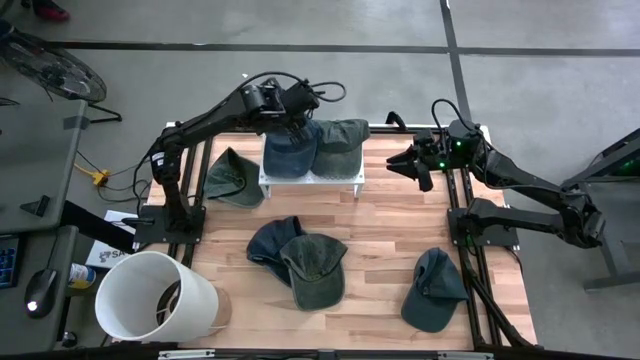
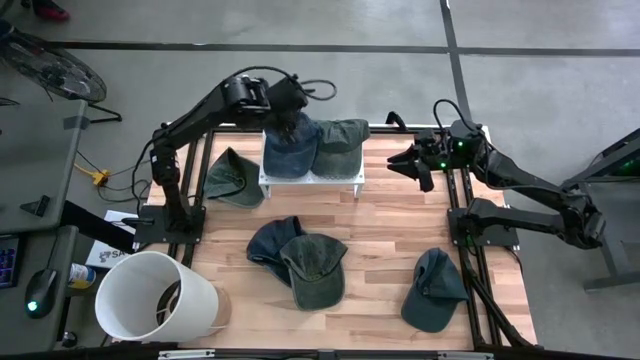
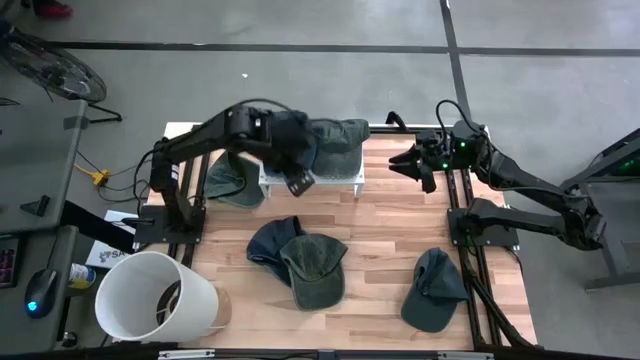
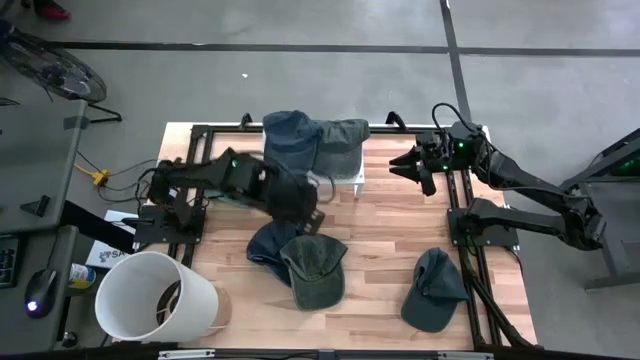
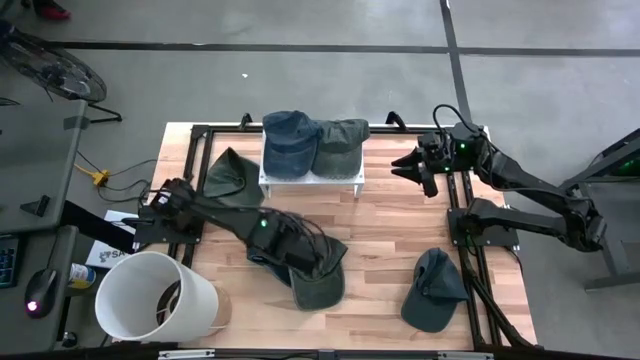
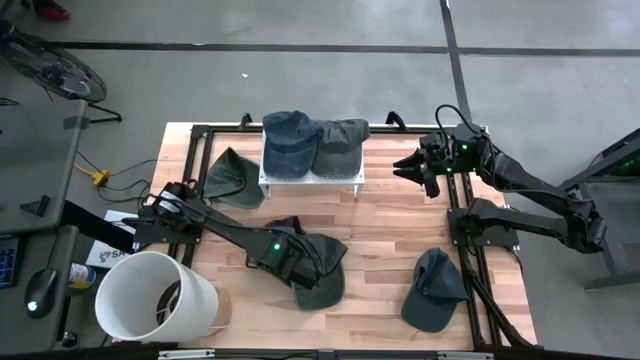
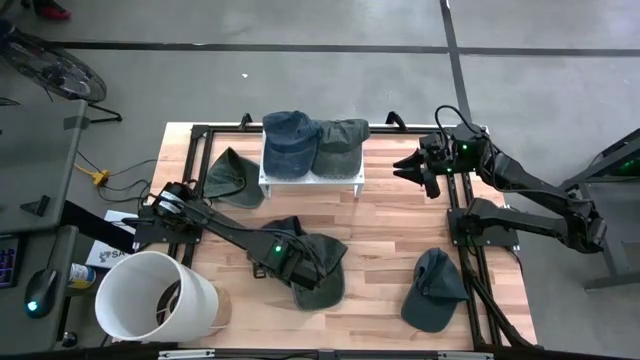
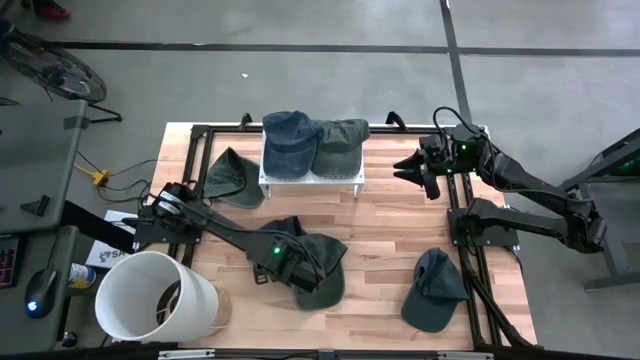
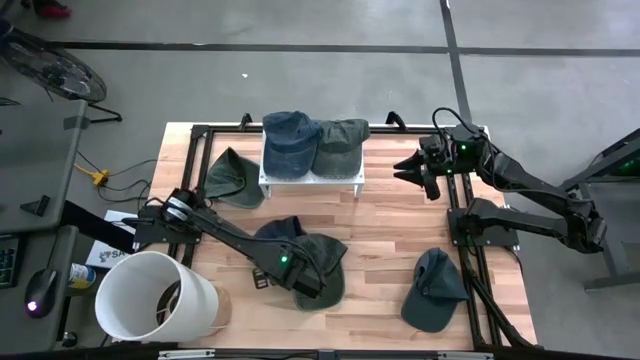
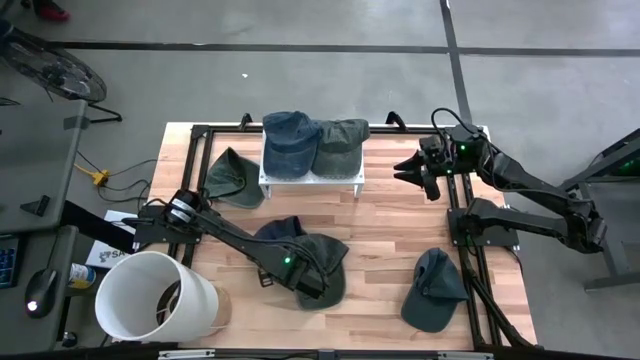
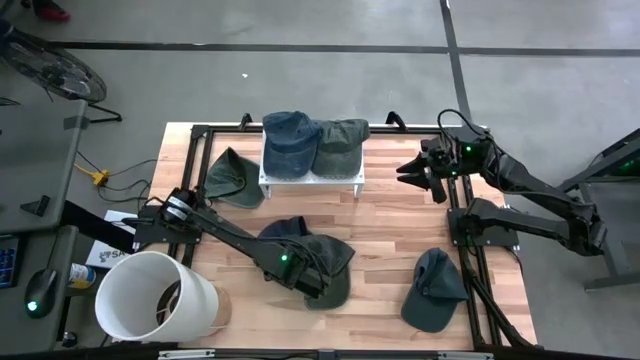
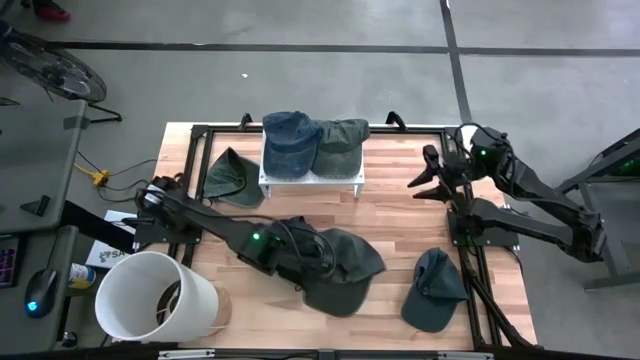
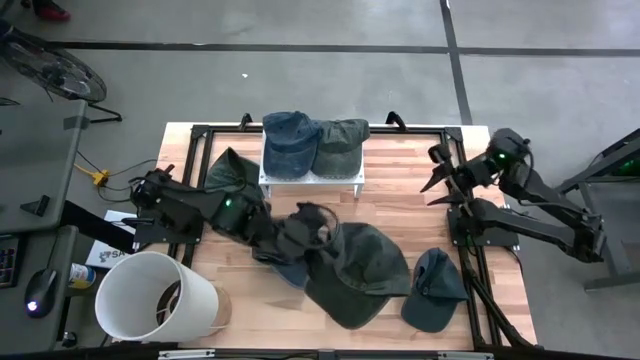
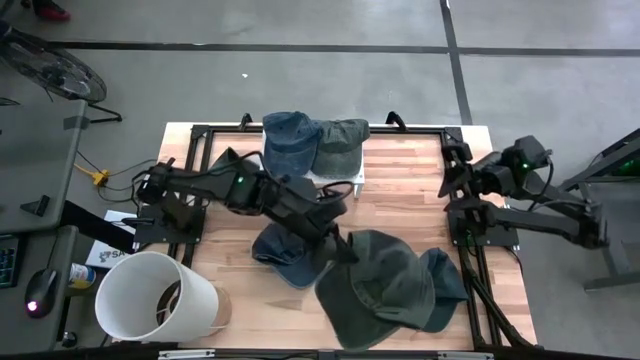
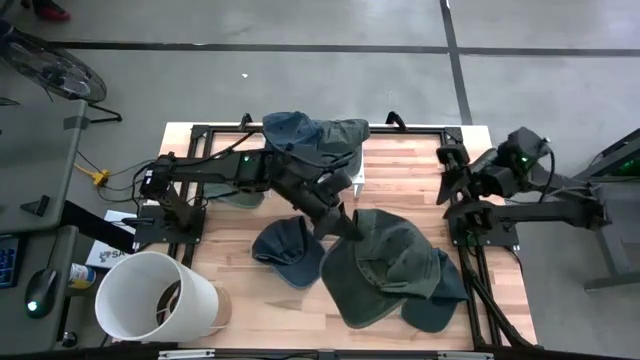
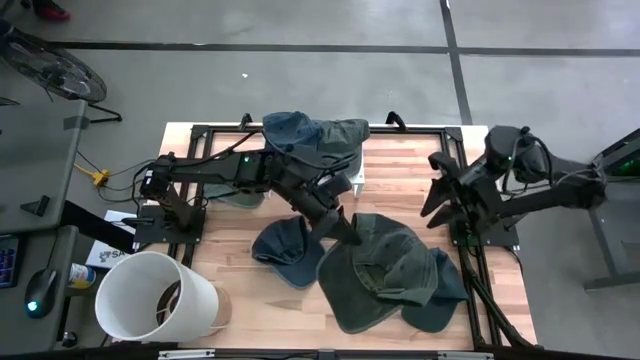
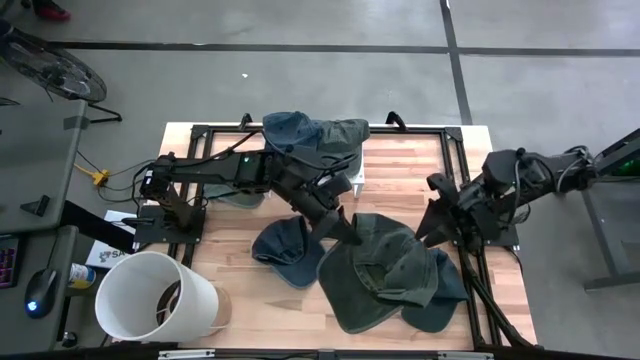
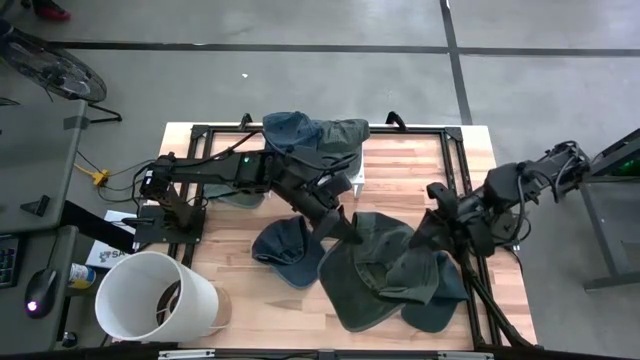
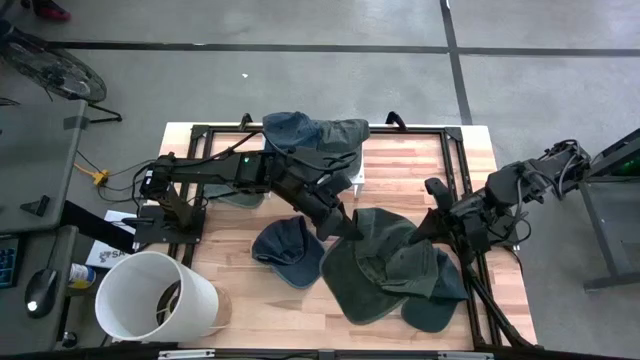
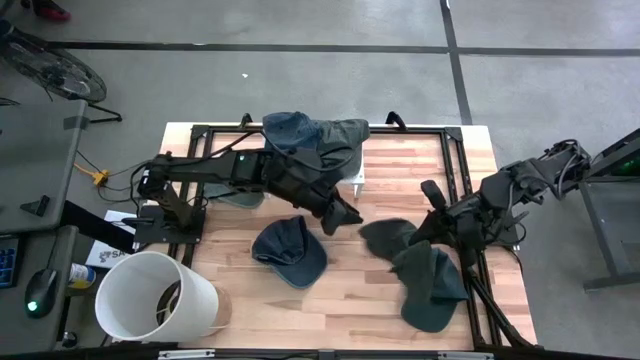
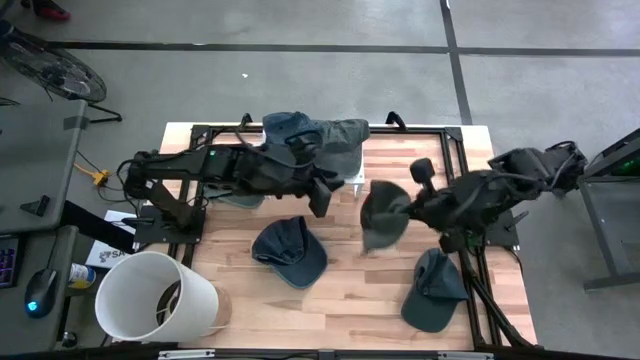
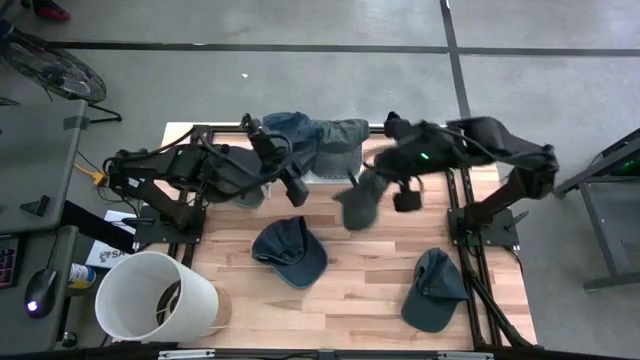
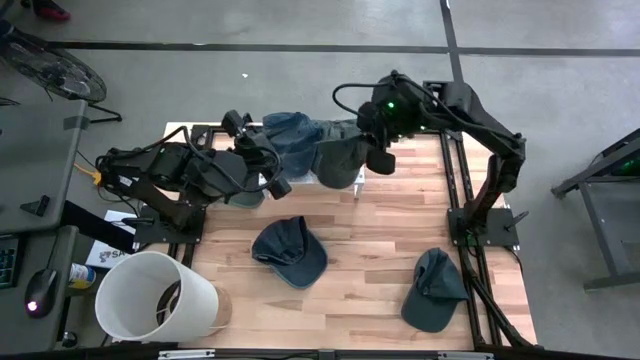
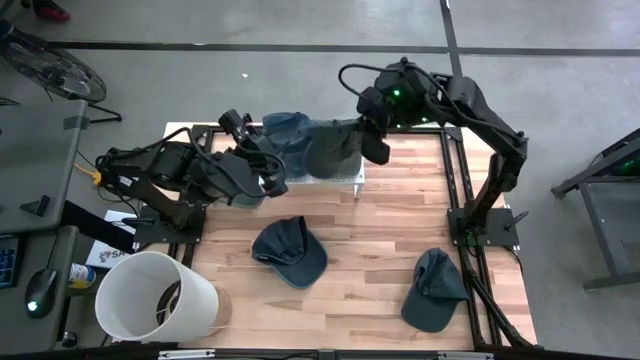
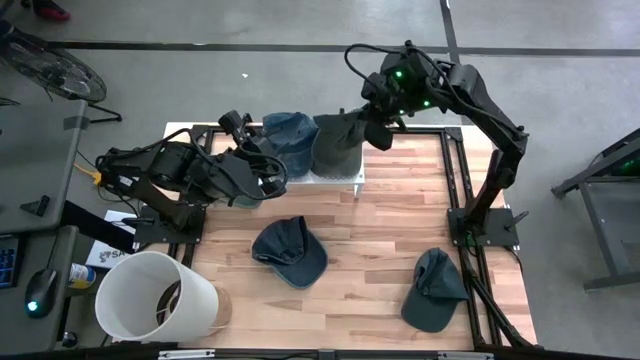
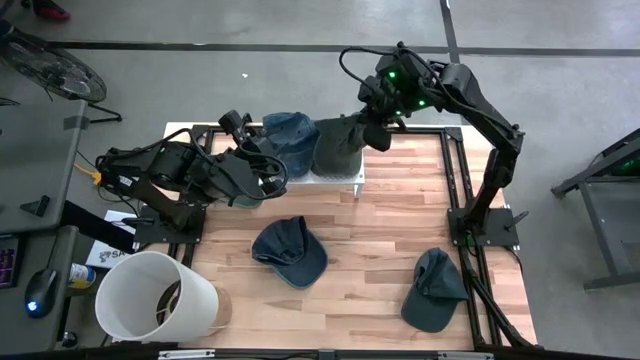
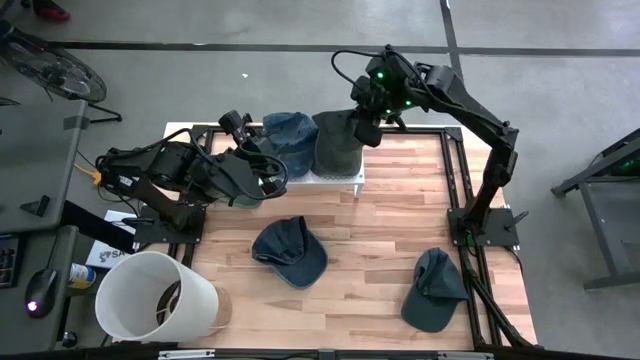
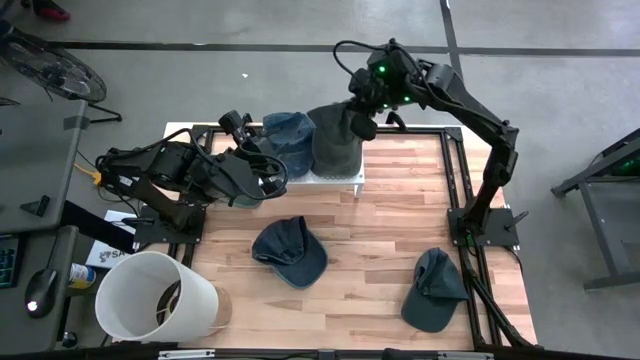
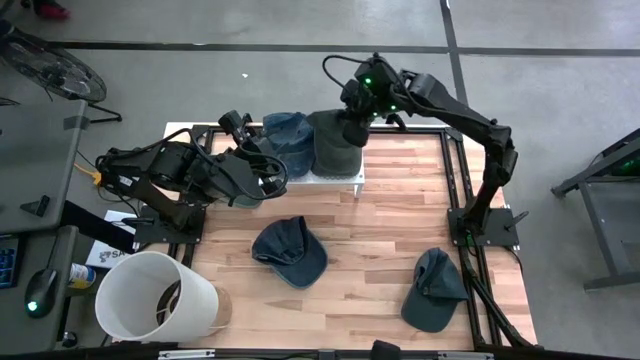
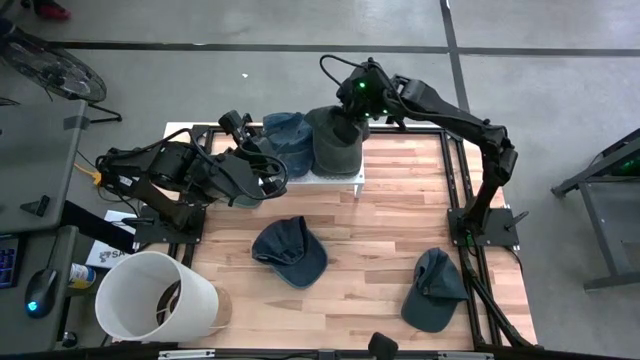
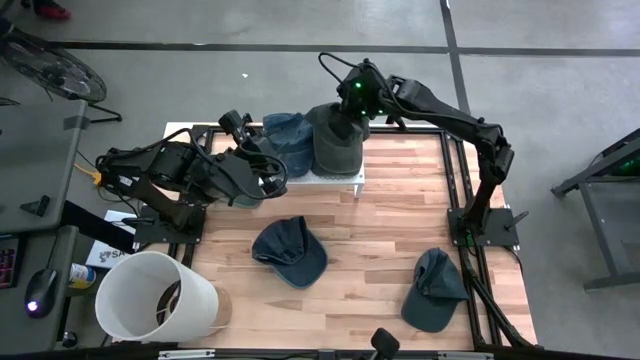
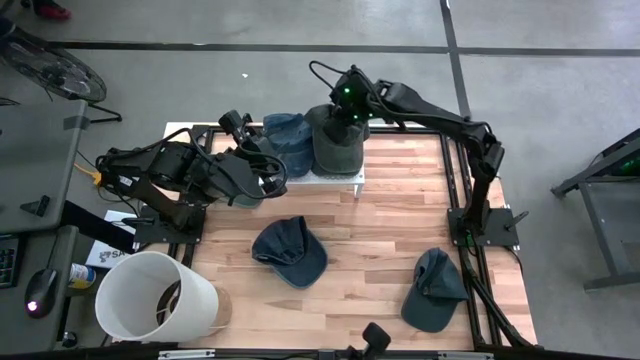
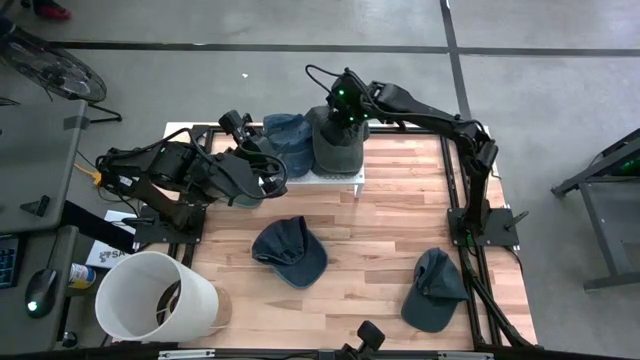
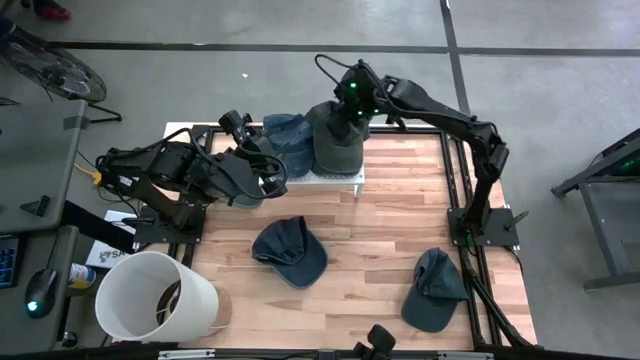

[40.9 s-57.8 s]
Task: Pick & Place hat
Stack the bottom gray cap on top of the other gray cap on the shelf

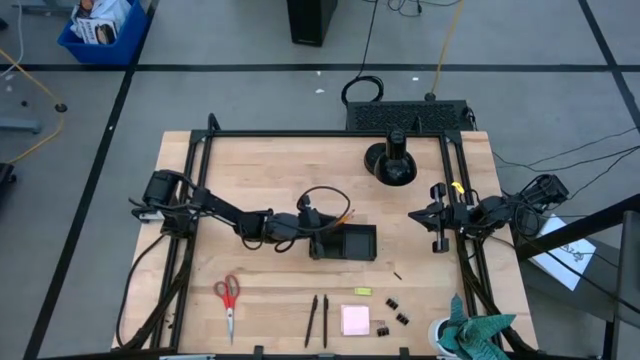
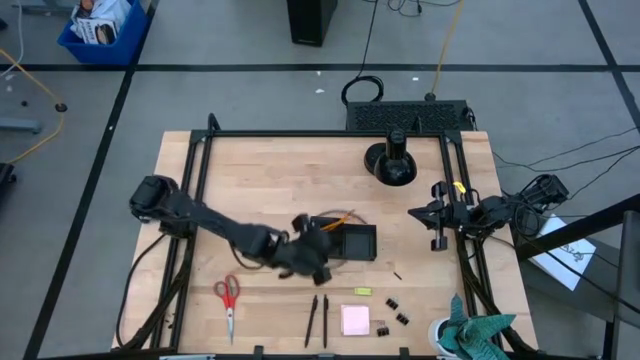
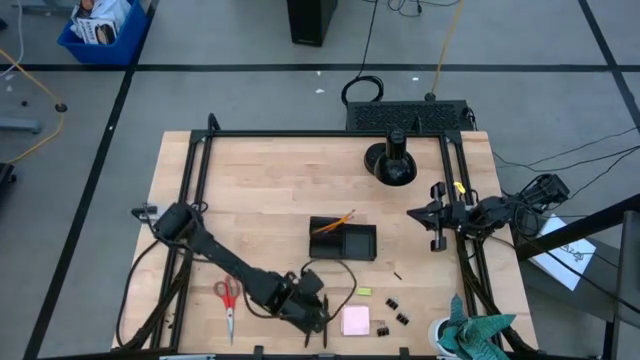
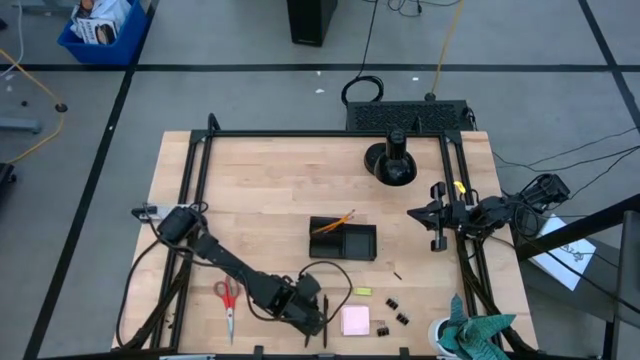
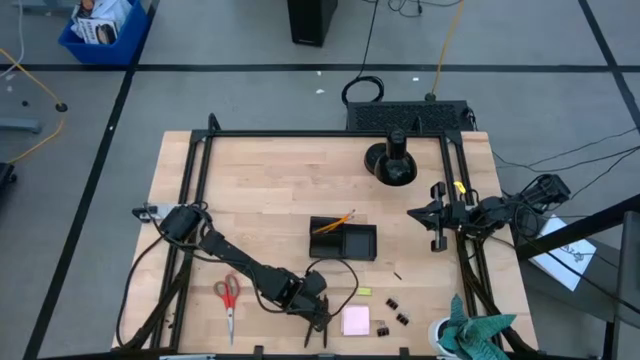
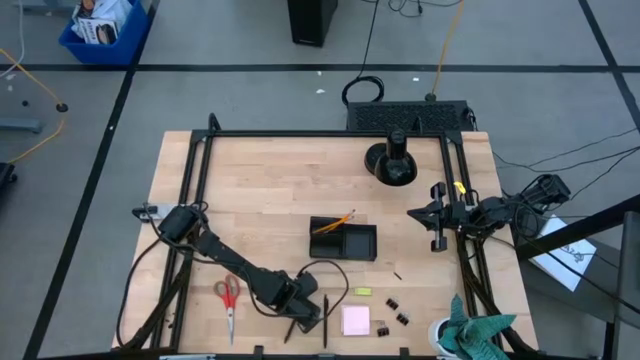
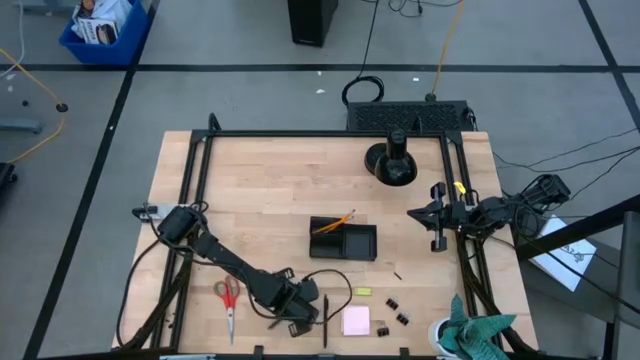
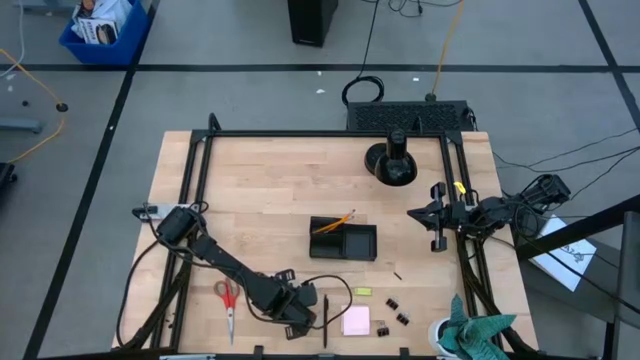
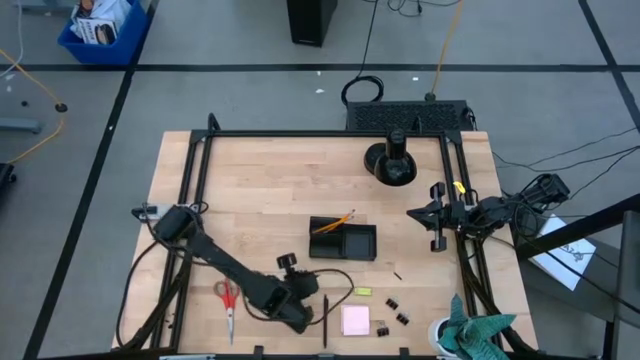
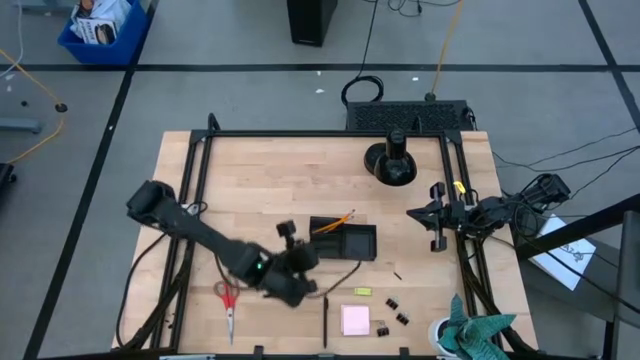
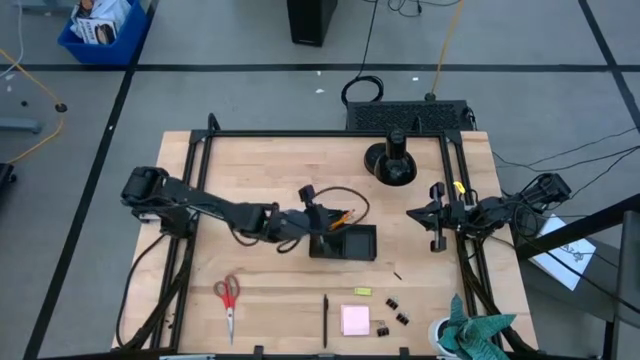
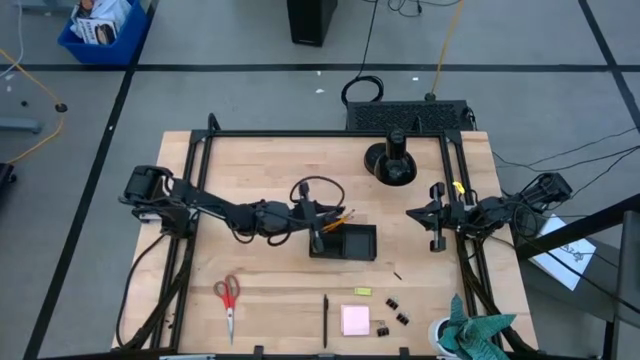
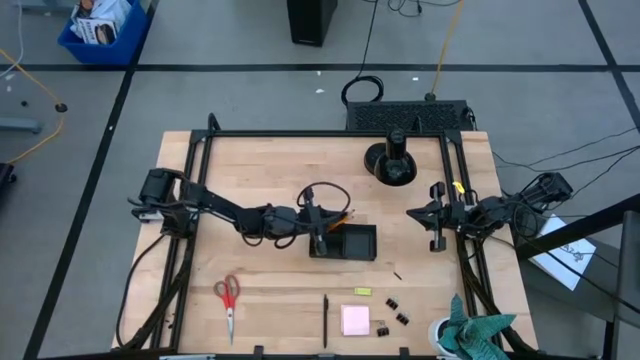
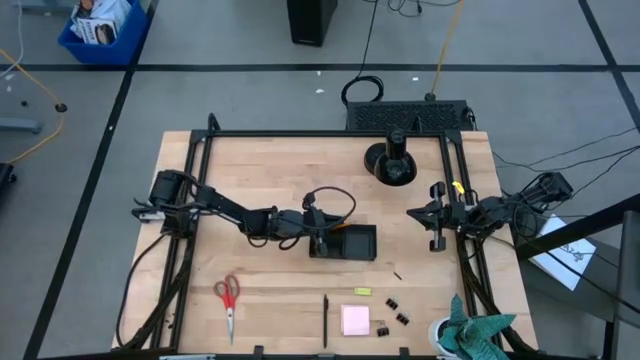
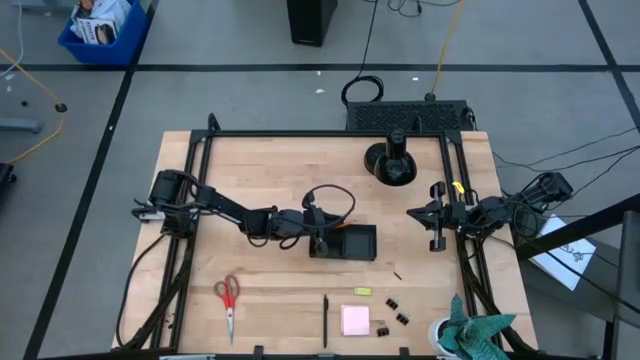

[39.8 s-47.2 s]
Task: Pick and place office supplies into organizer
Put the black pen into the black desk organizer
